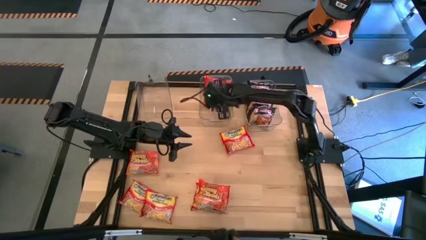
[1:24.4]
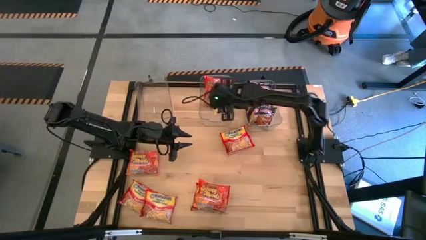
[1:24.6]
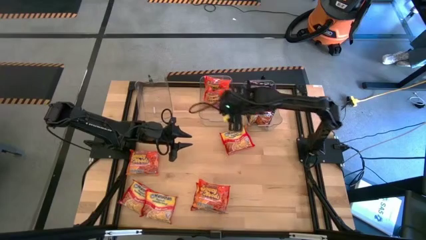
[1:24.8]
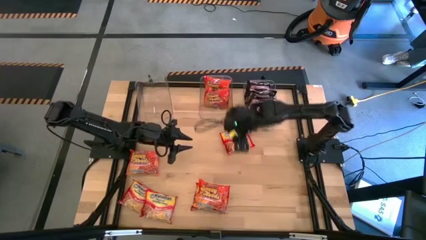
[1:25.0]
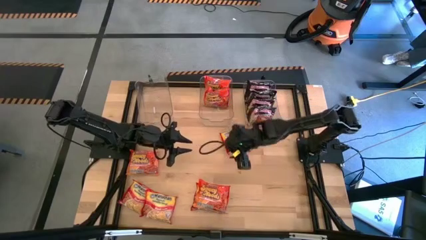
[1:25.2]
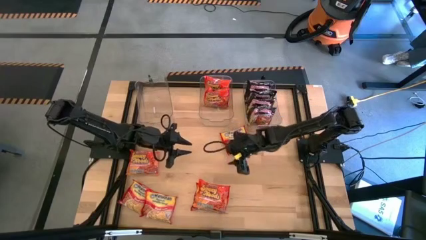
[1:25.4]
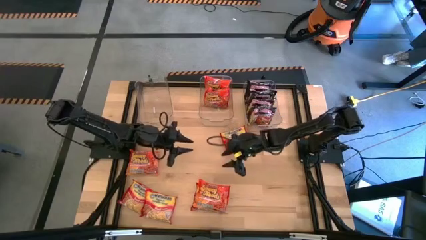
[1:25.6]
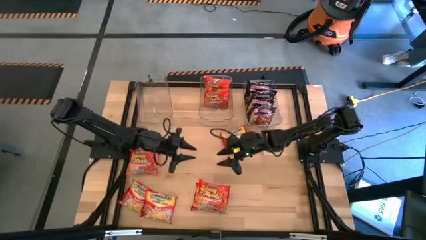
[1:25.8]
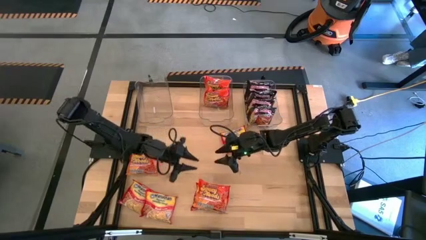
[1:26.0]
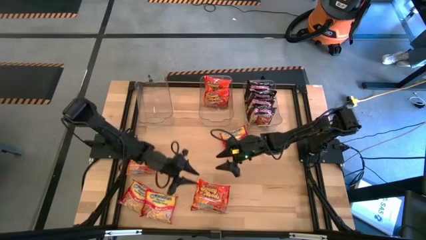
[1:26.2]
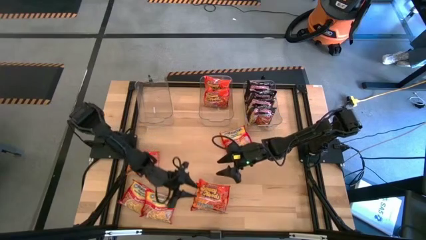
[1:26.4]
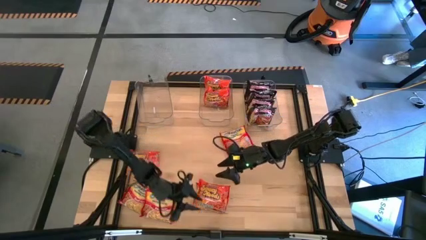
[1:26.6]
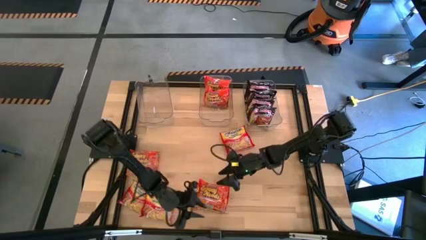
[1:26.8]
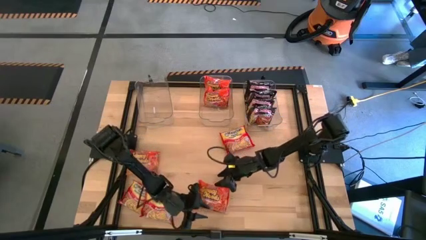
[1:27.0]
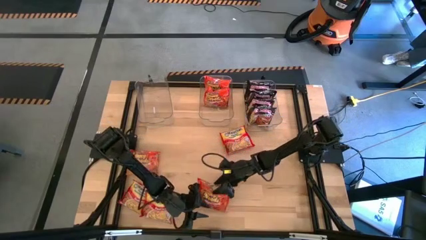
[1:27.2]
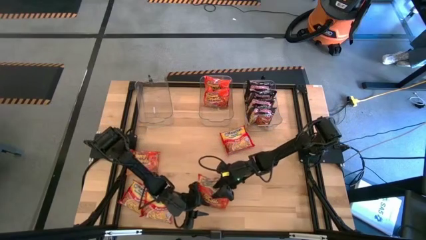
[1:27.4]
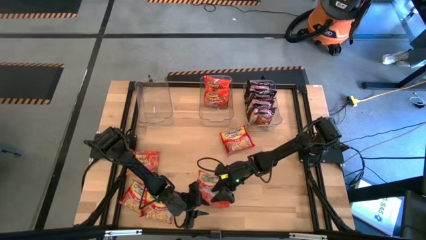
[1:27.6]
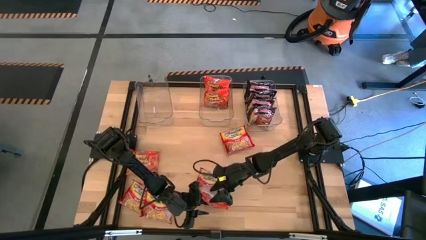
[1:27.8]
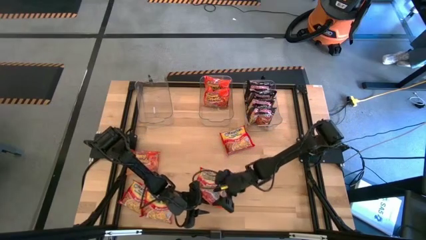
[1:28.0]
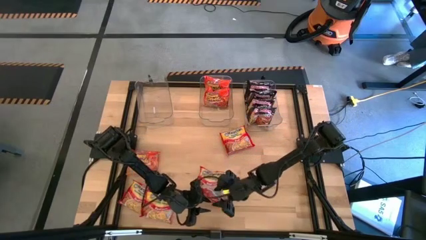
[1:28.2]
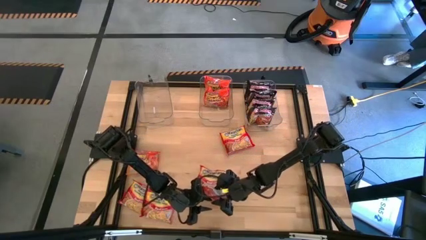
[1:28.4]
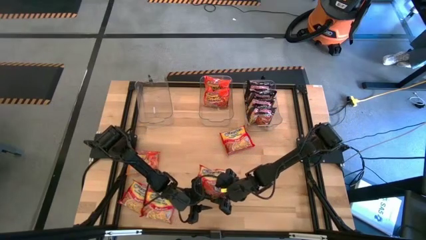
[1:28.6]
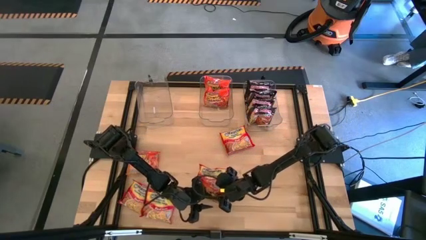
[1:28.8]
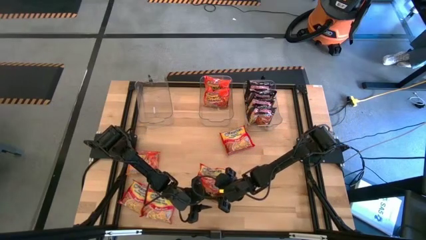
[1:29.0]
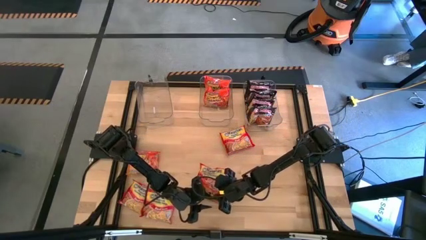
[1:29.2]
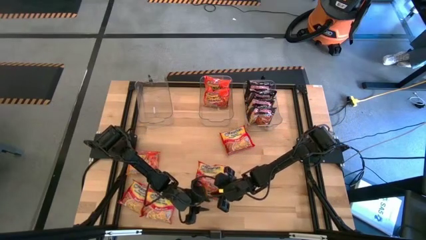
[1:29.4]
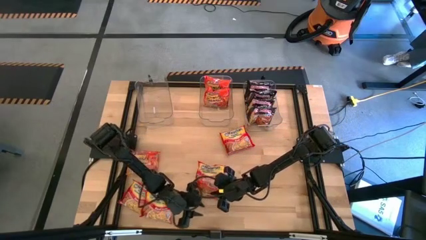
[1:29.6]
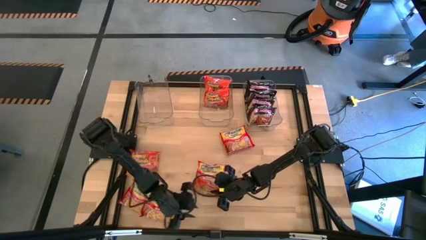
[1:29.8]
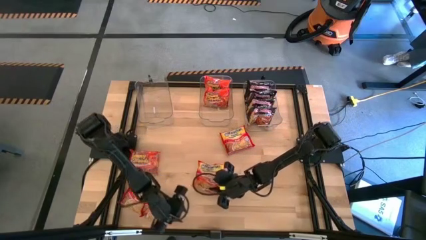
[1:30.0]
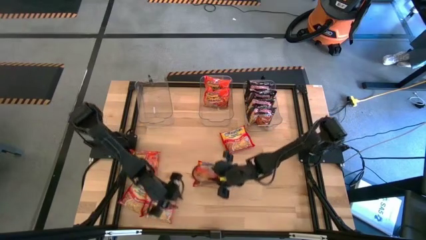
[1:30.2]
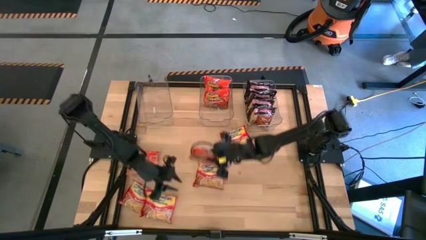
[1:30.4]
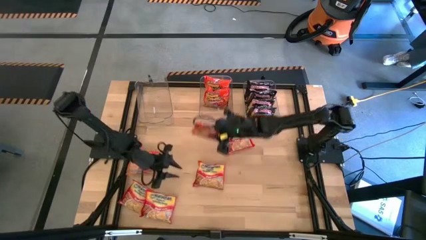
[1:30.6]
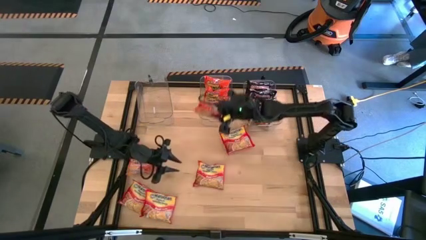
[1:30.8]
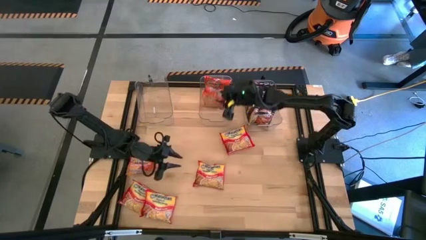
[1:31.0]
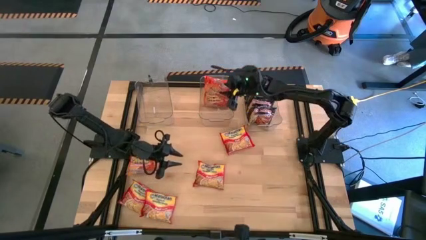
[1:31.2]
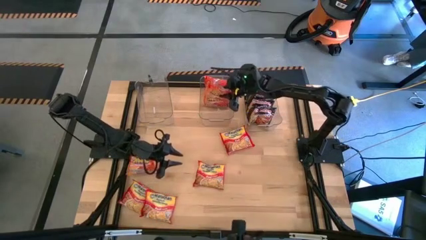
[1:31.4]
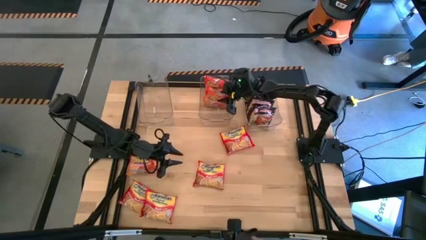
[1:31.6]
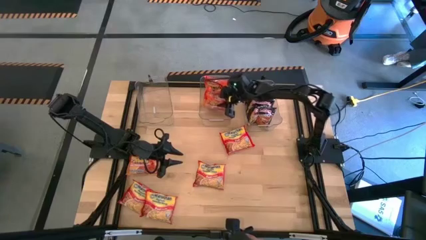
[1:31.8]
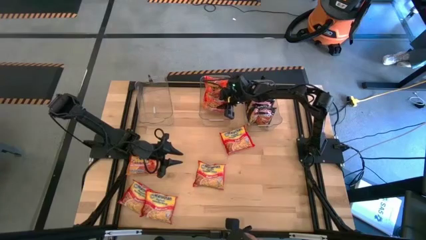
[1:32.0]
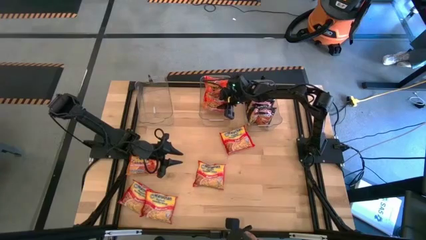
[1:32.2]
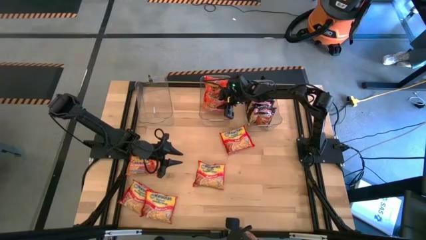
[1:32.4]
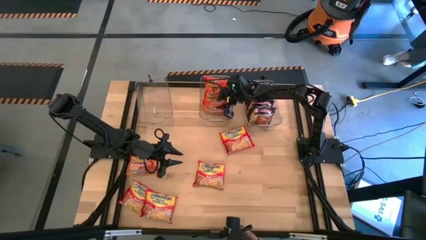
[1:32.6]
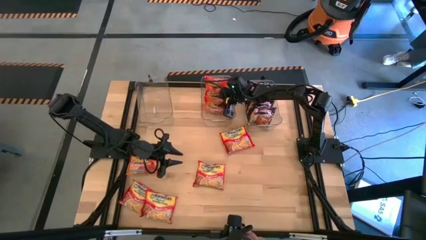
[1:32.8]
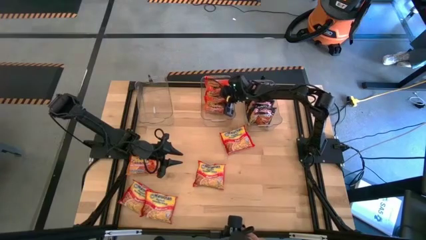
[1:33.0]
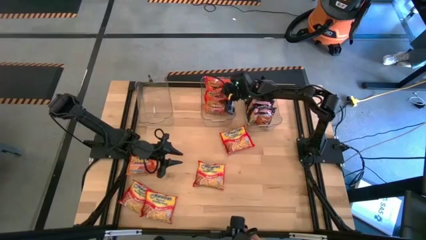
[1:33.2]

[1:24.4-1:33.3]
Task: Sort Maruchan noodles
Put the orange noodle pack into the middle transparent bin

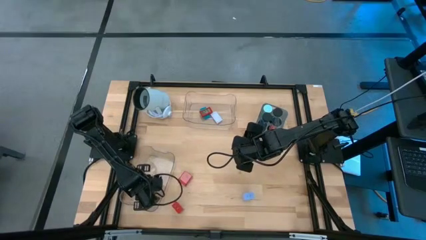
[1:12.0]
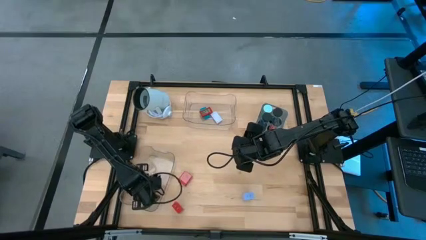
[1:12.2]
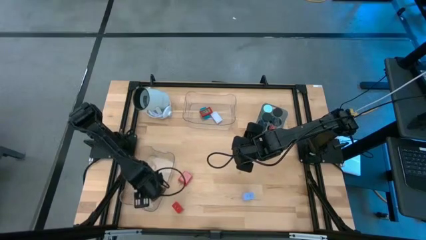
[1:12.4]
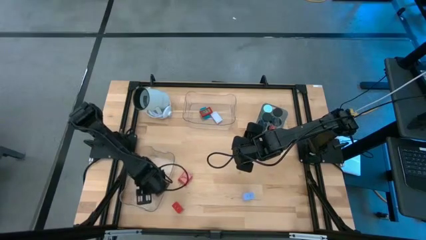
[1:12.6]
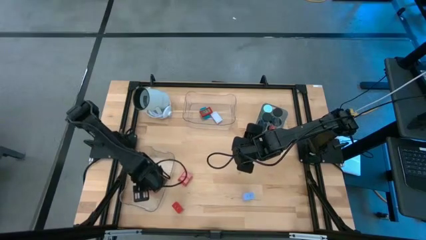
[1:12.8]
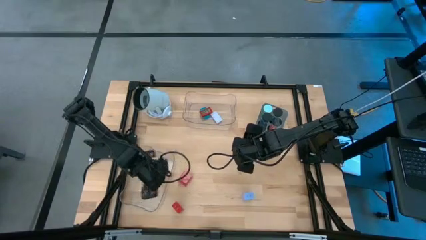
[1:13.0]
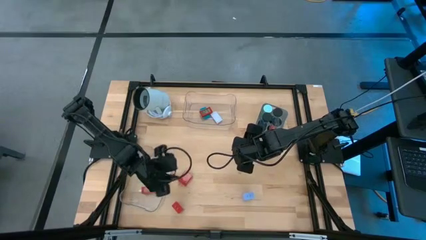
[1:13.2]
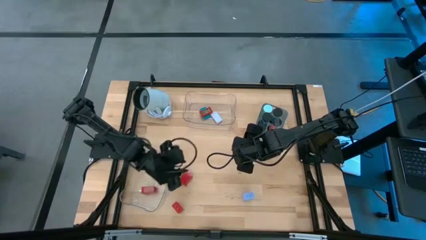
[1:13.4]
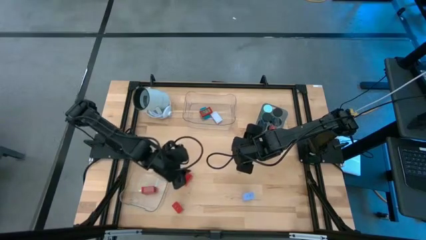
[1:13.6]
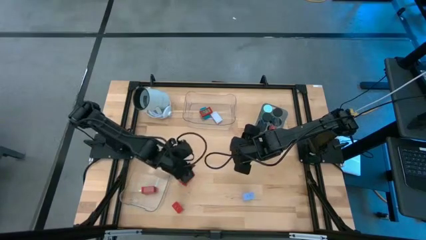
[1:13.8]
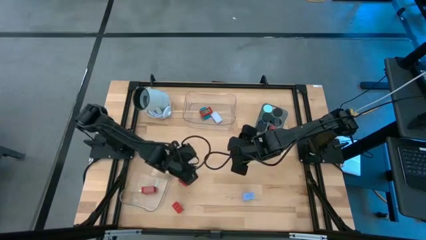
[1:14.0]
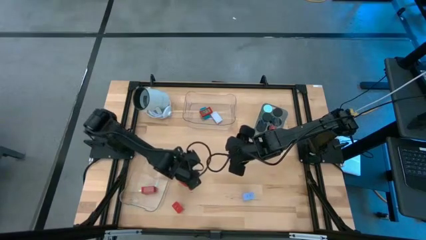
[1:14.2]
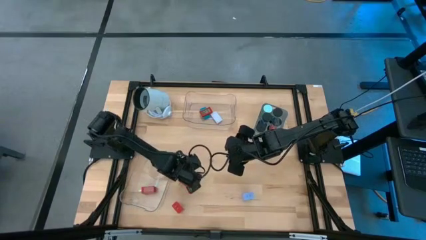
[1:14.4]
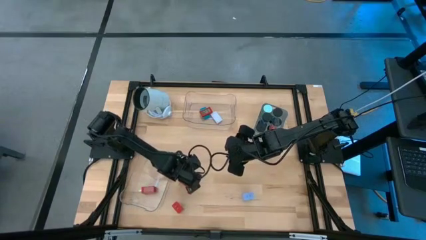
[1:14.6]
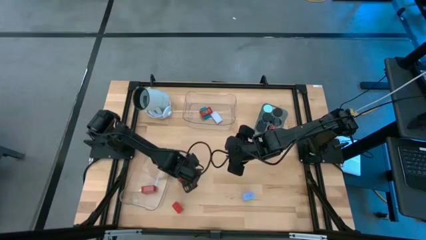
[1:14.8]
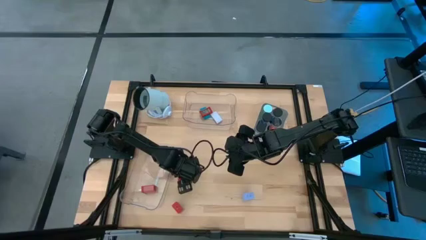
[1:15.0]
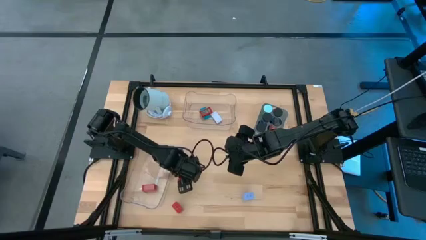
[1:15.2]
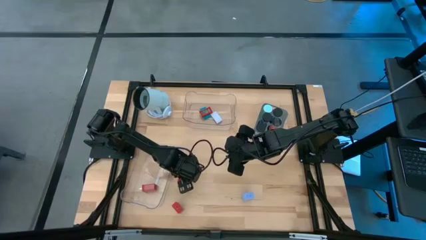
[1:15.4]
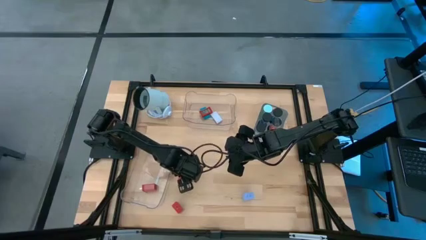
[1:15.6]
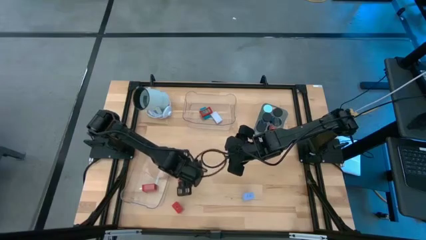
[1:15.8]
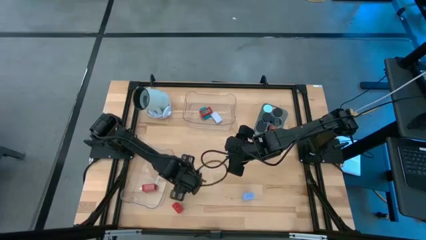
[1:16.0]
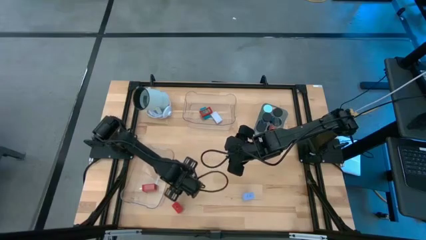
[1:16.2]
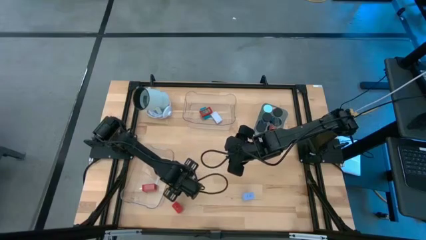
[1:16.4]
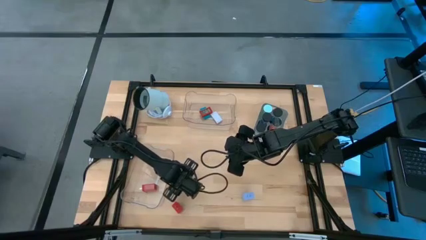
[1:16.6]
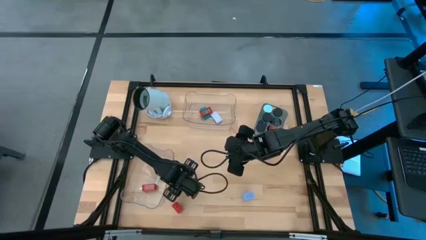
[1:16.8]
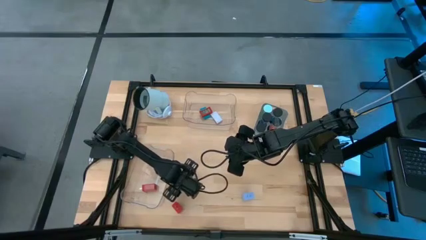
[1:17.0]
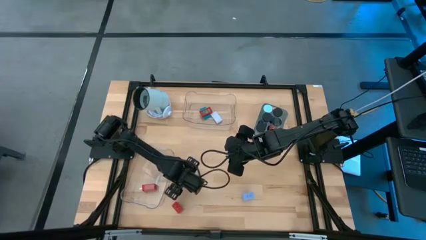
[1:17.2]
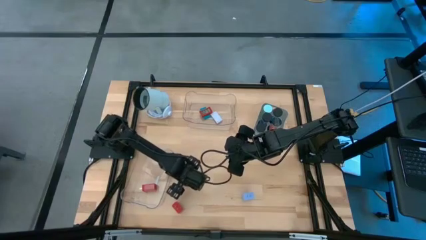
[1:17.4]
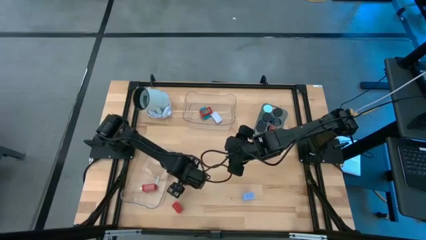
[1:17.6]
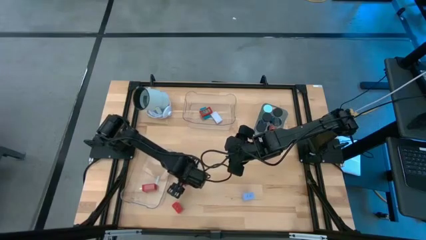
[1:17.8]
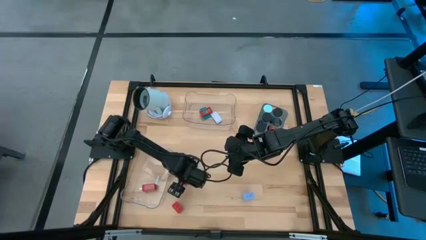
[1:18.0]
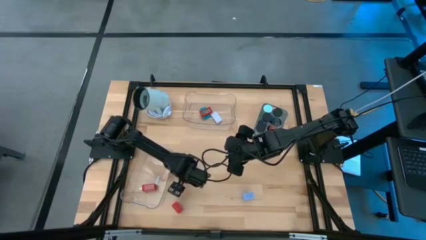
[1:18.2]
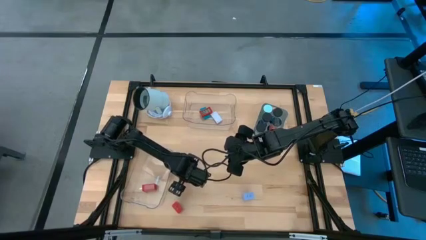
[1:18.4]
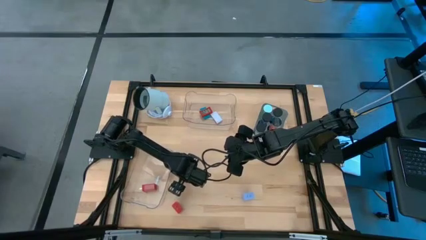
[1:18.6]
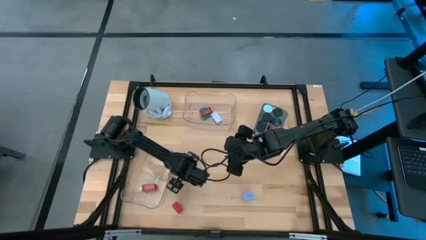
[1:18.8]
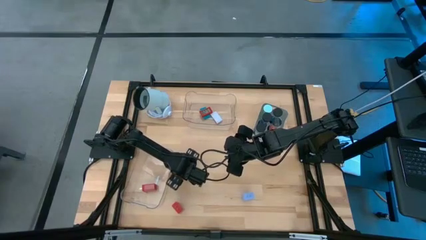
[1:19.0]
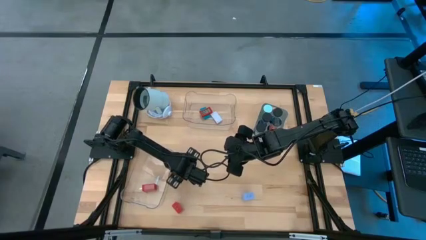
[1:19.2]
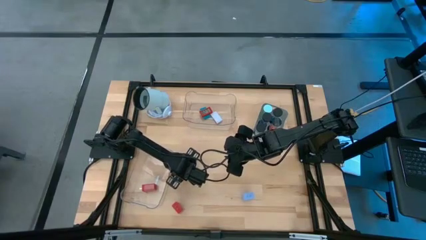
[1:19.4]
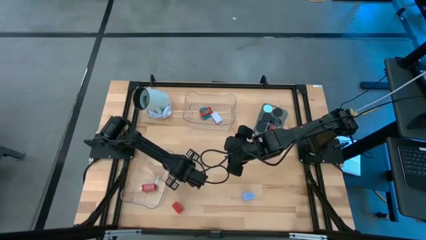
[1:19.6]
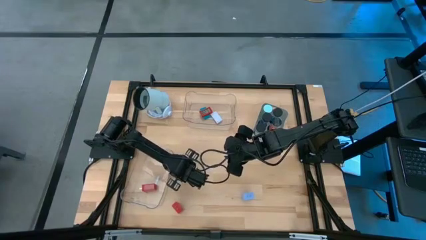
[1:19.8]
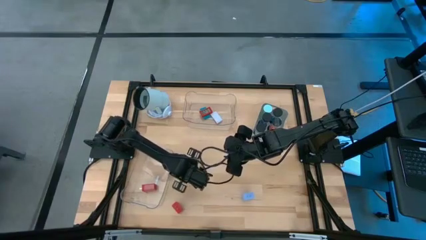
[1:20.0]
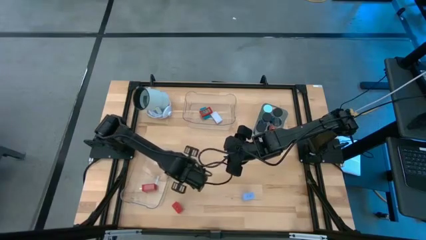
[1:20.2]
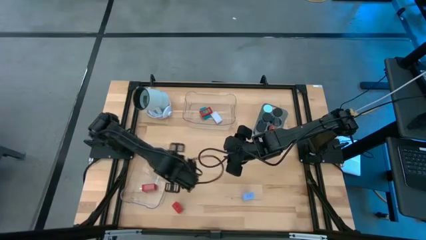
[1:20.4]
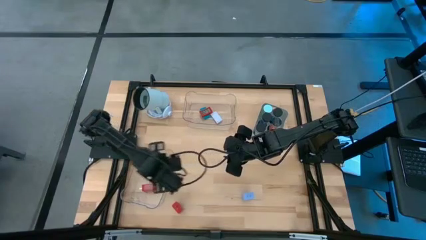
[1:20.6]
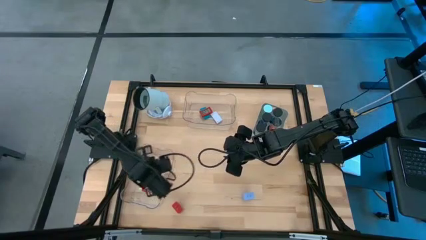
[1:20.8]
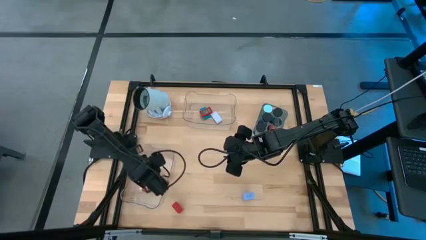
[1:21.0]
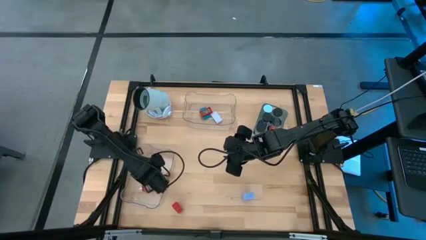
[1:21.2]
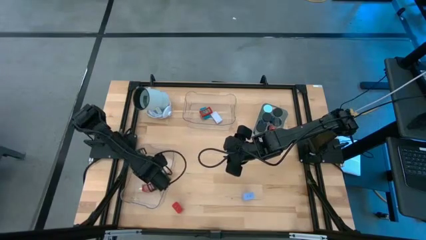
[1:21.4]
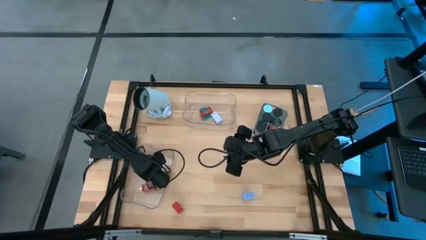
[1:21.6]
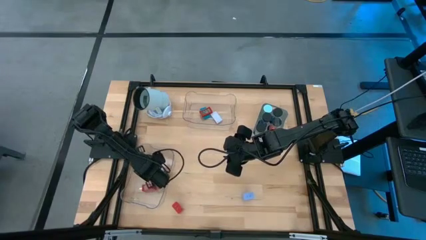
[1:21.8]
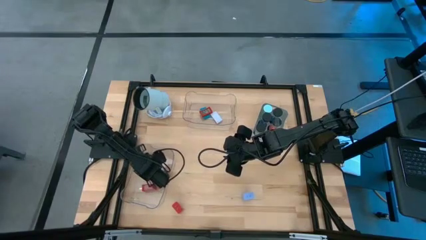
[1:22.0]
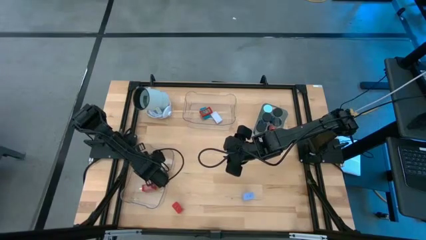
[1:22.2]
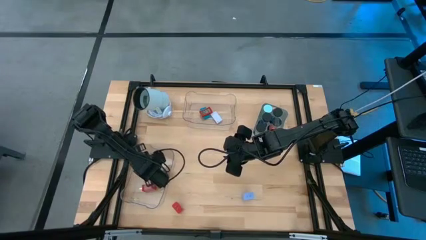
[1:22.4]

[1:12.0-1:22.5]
Task: Pick & Place Office items
Put the top red USB adapter into the left clear bin
